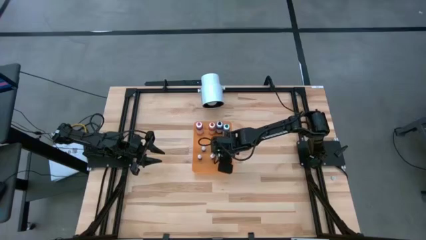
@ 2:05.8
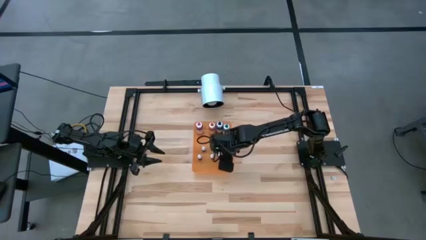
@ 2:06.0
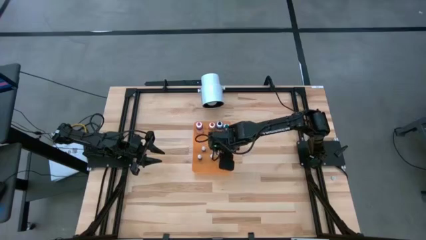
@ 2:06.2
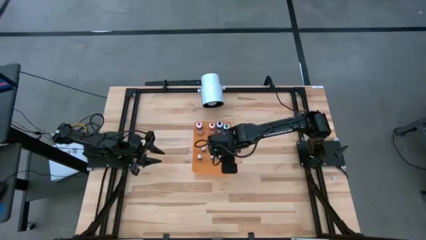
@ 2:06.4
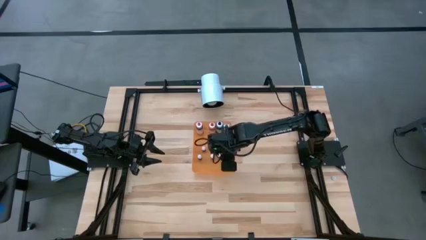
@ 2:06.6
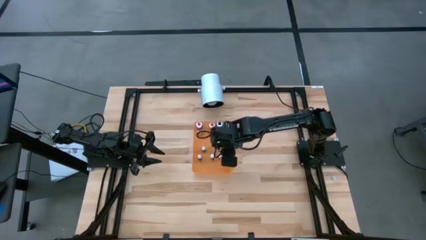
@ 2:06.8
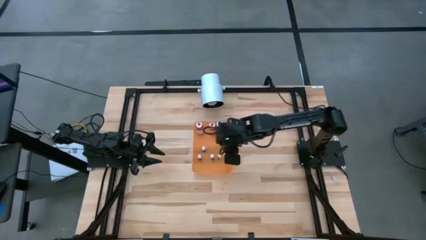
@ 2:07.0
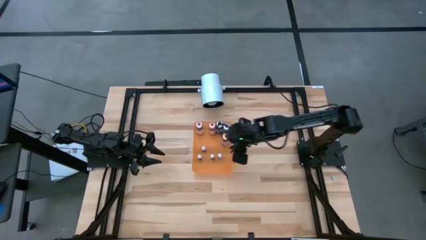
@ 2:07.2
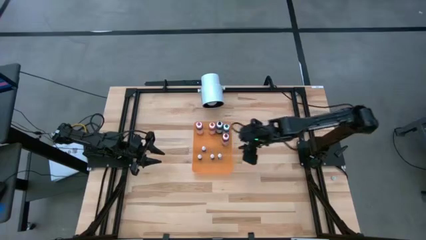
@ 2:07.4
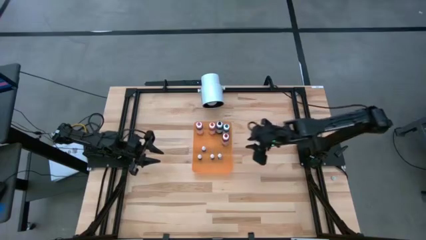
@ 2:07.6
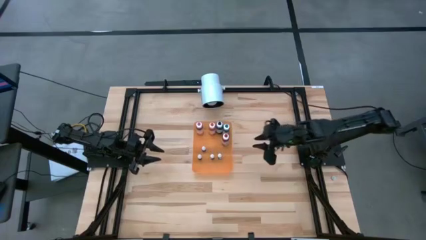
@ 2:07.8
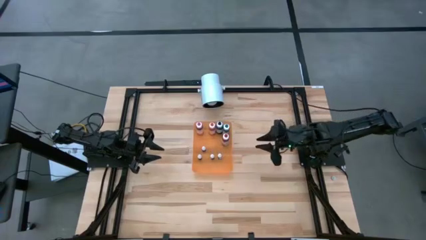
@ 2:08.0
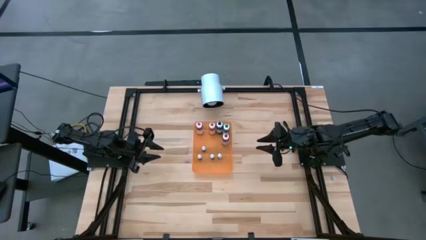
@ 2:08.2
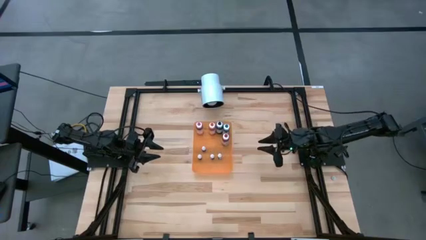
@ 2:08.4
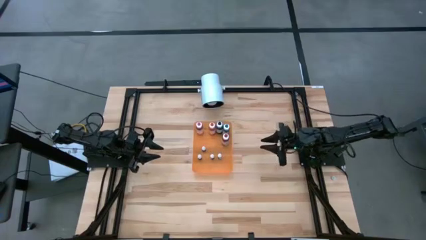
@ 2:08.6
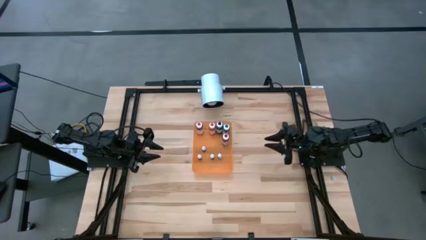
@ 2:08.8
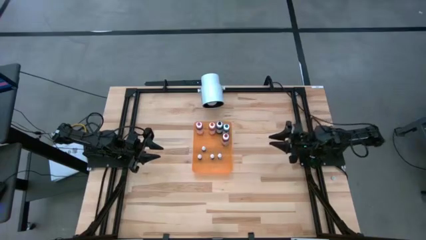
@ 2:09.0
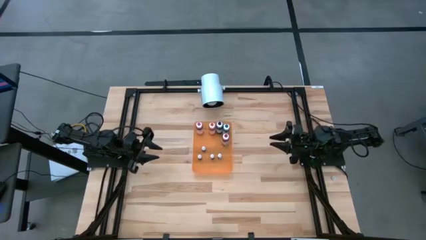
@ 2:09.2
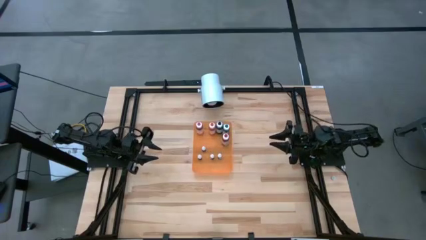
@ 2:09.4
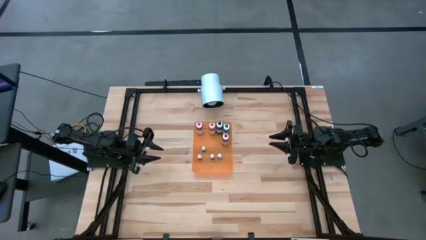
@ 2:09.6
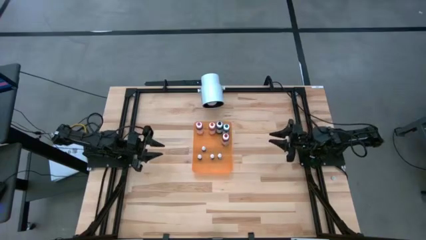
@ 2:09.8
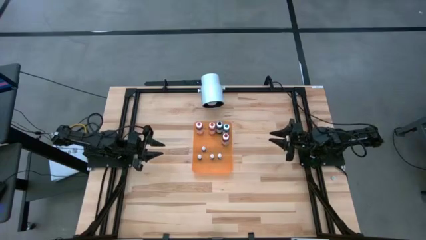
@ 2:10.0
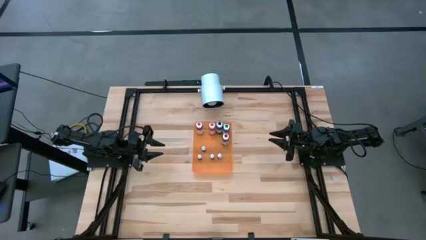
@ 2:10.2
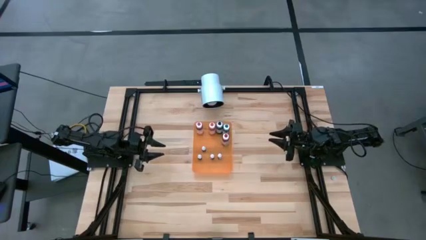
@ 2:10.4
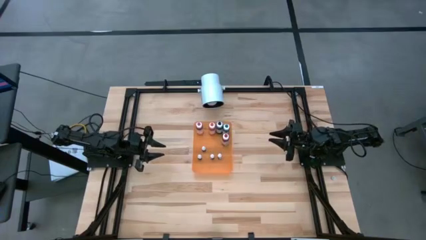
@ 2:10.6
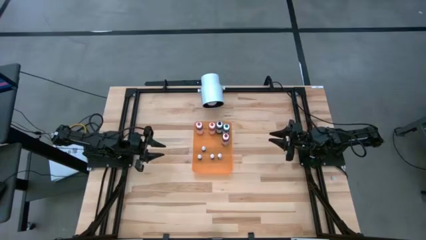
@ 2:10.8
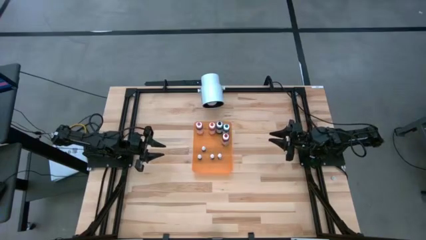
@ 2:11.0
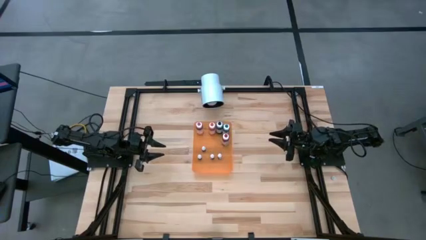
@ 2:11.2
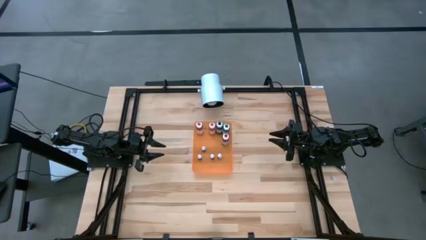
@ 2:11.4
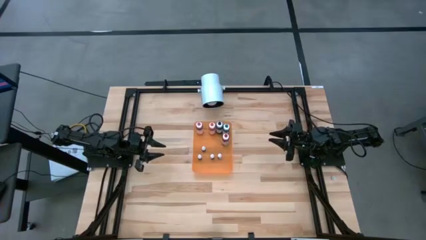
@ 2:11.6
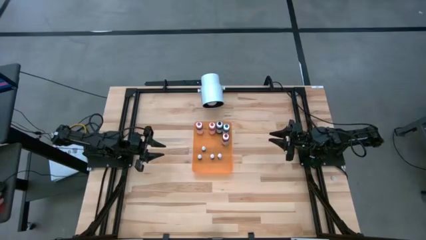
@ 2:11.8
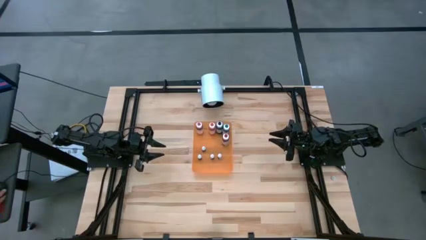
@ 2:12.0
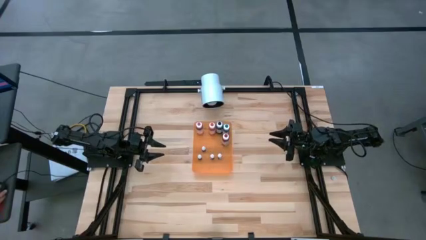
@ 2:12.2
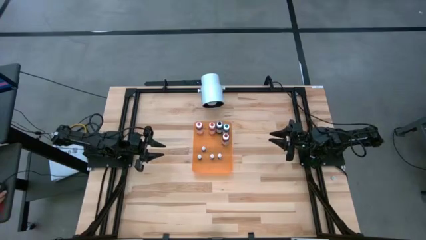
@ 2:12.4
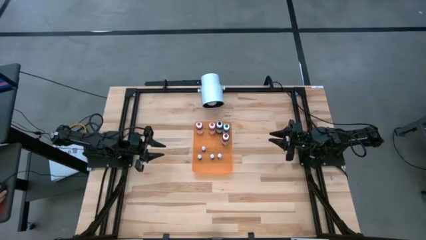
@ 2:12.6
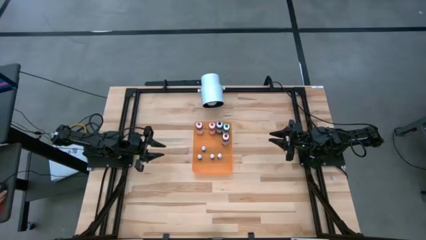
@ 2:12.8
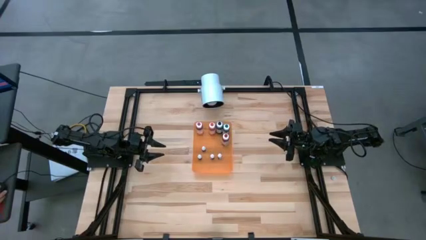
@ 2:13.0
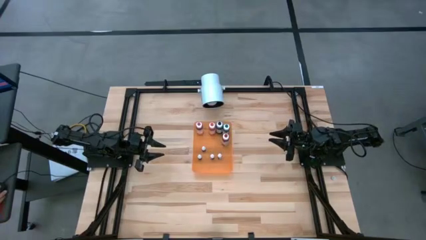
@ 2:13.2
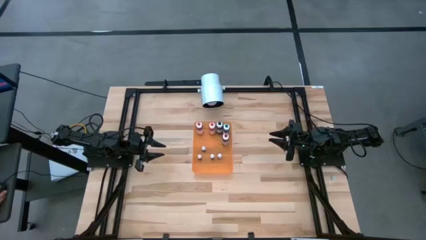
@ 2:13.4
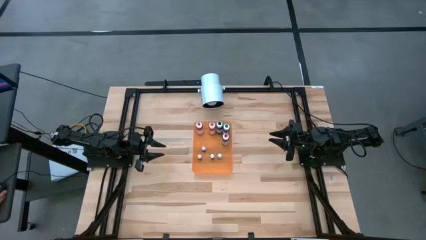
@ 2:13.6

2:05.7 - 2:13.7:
Task: Pick & Place food coloring
Return to Home Position

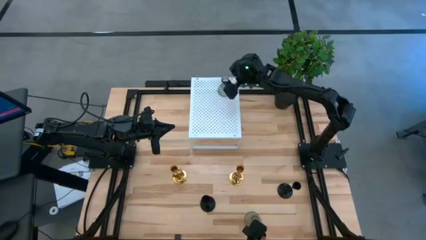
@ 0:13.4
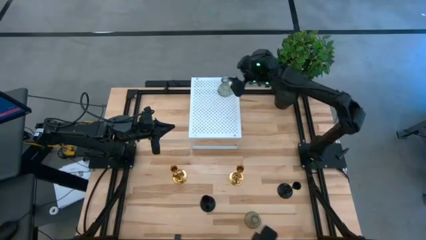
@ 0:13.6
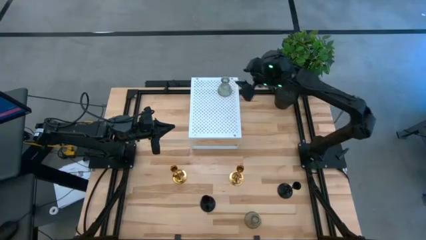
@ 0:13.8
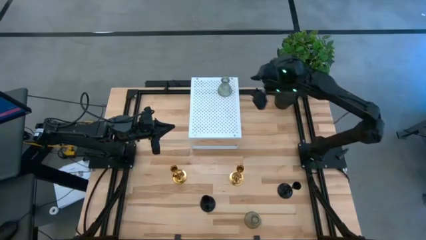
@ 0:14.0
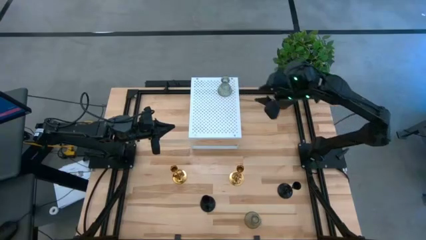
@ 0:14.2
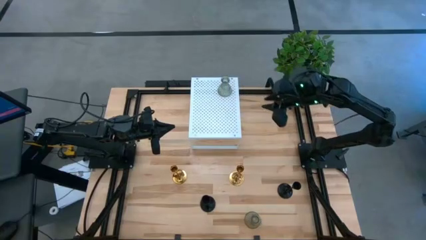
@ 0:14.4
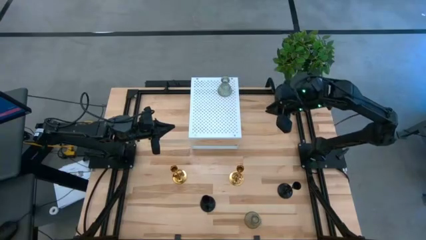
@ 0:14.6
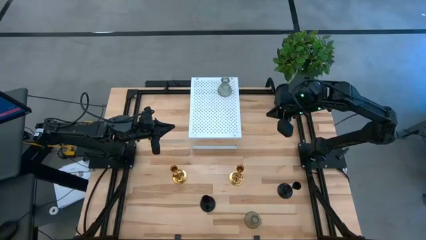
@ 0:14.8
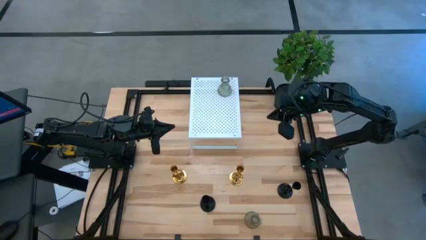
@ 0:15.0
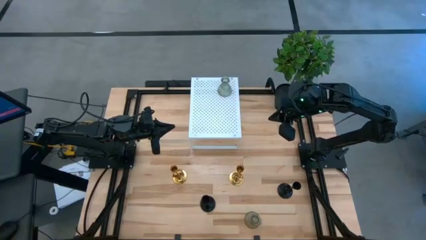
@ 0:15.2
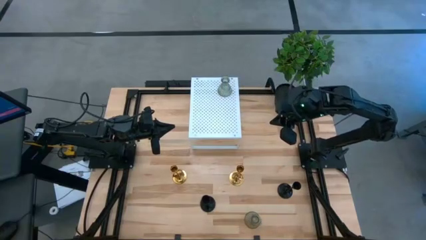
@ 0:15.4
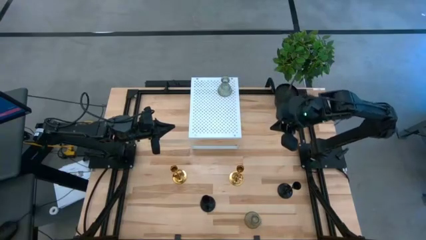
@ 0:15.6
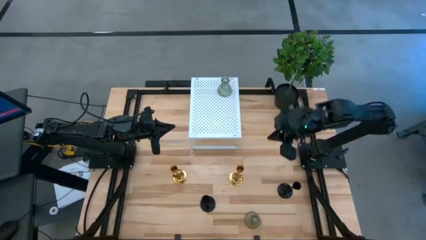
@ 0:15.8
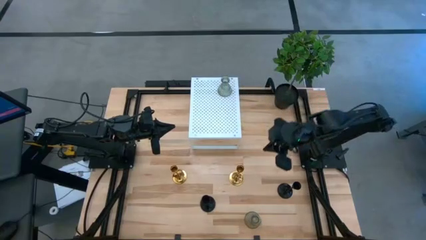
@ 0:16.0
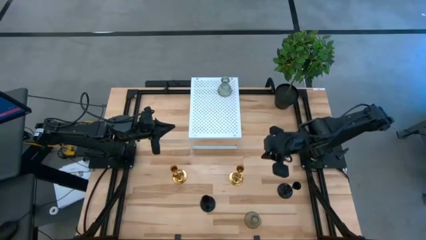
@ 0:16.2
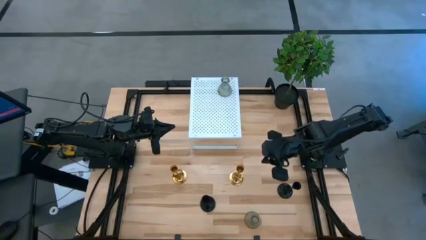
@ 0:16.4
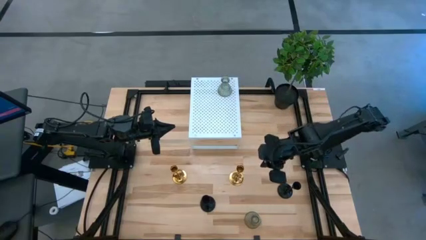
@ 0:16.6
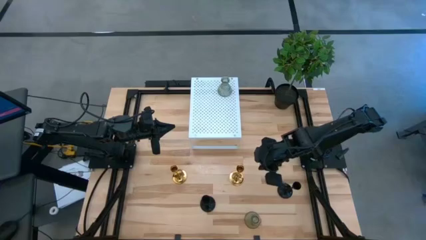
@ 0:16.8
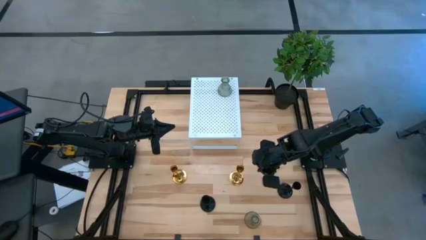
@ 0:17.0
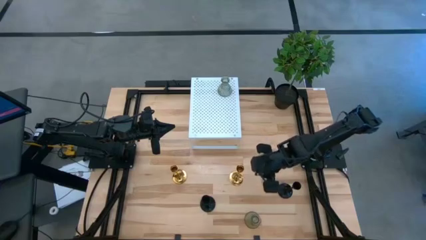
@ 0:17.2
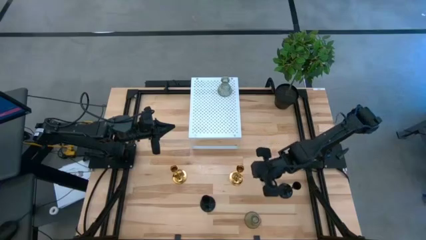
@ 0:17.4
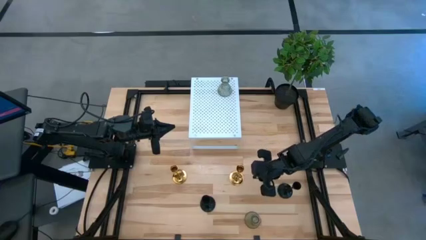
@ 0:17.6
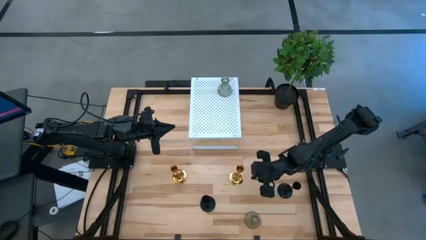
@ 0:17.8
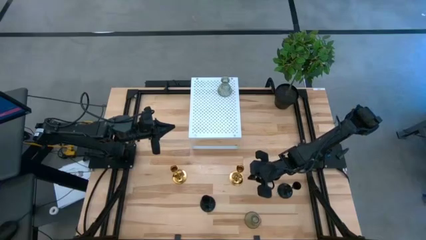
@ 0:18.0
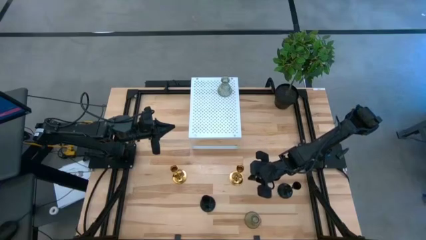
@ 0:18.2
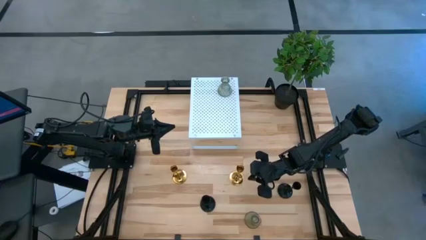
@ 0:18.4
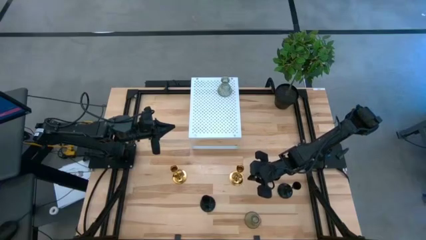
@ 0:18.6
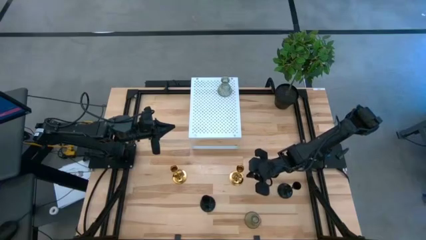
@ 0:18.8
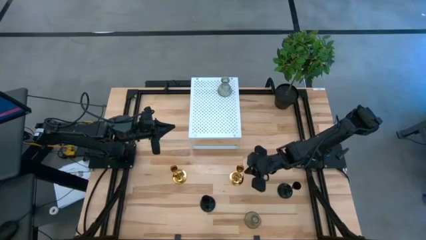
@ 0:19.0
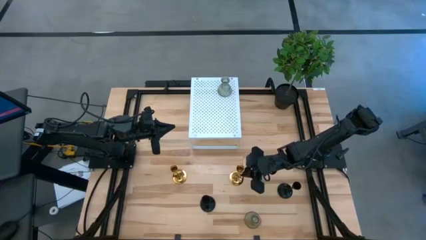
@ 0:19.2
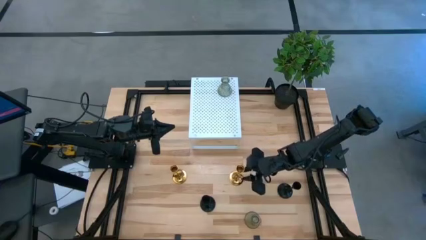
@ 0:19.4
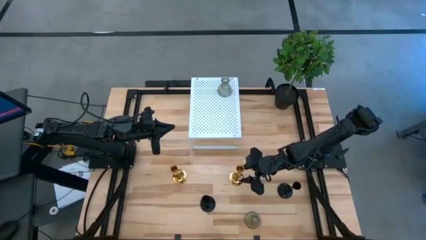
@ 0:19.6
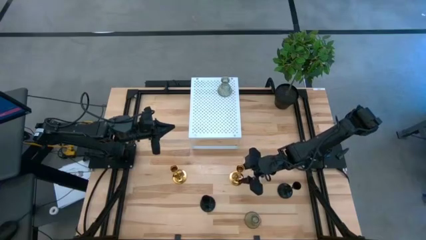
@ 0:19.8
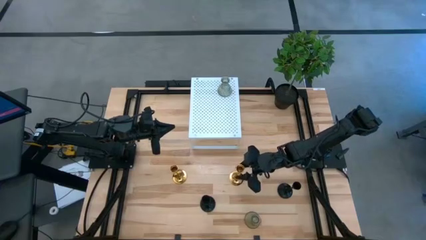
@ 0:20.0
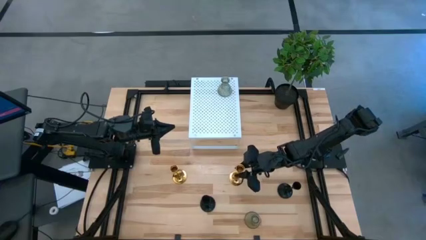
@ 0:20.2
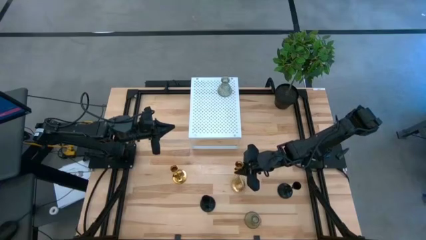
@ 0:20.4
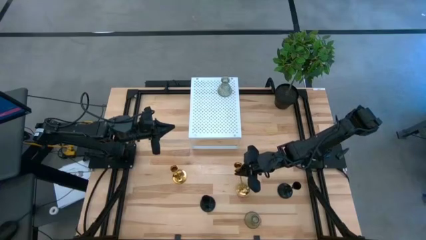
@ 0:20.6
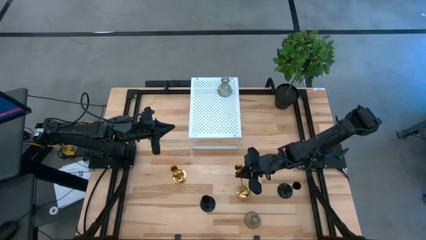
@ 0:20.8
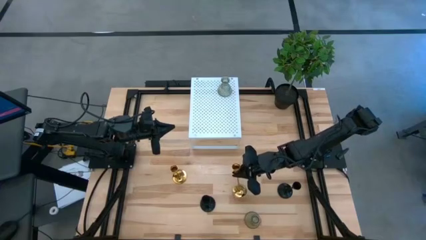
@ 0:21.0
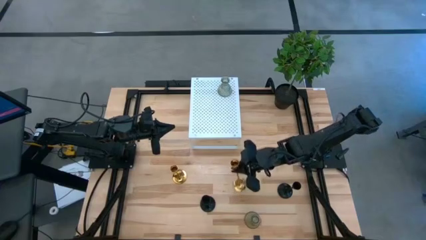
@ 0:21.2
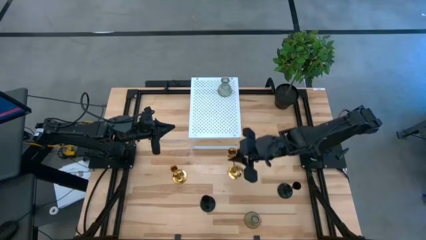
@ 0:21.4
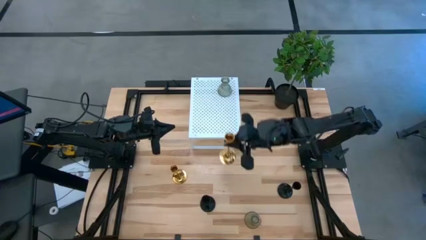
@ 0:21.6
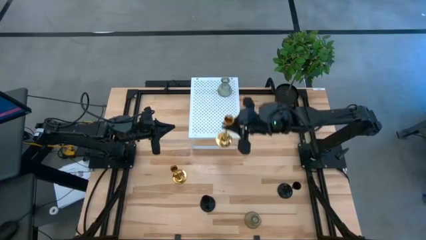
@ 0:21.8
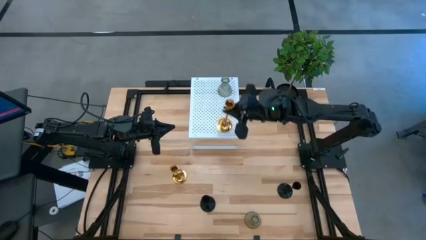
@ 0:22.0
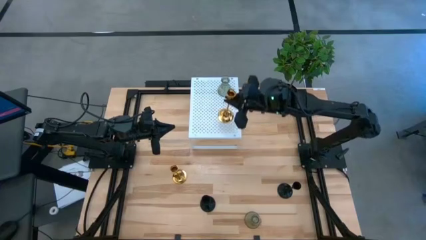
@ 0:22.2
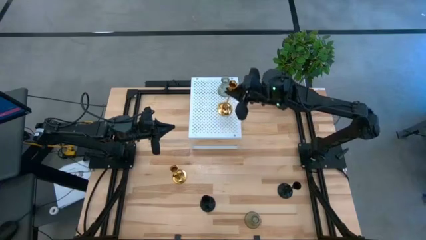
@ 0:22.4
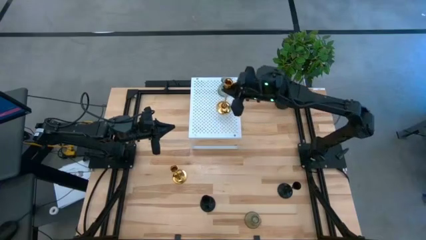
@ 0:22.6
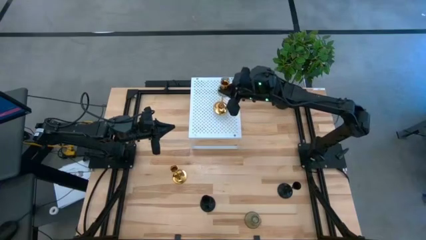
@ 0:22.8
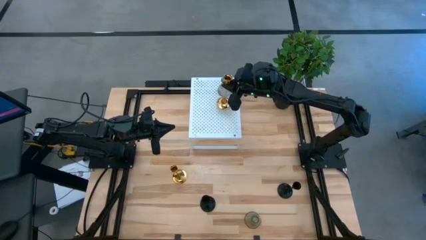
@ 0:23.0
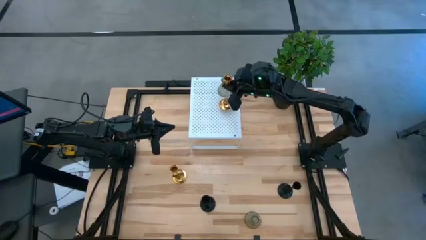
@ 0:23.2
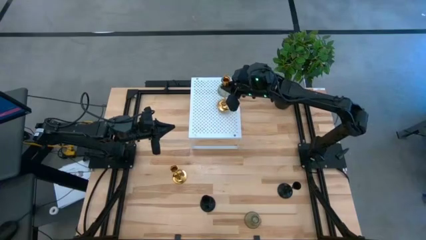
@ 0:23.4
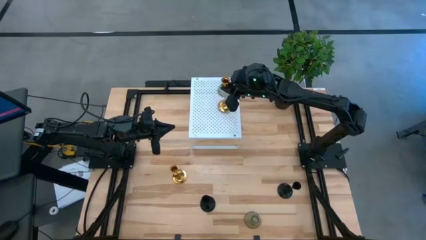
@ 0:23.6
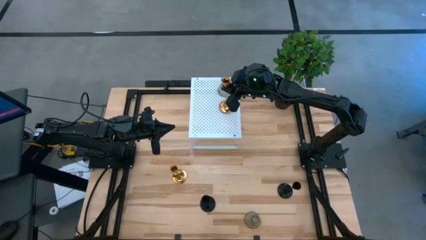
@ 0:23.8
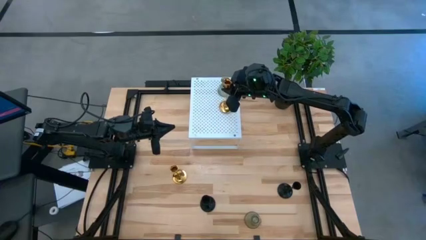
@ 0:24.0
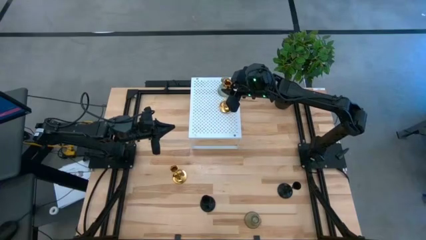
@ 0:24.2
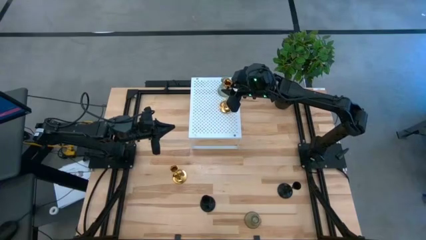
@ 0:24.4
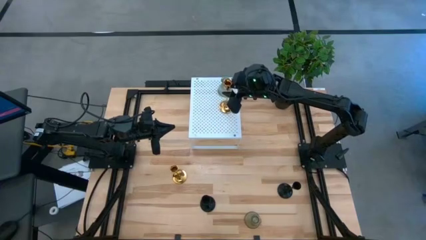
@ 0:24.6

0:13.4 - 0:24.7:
Task: Pick & Place candle stick holders
Put the right gold candle holder on the shelf
